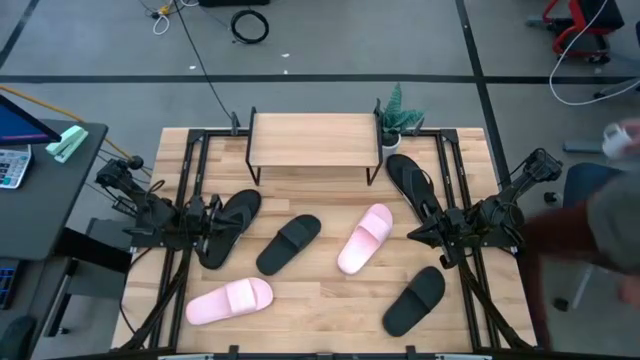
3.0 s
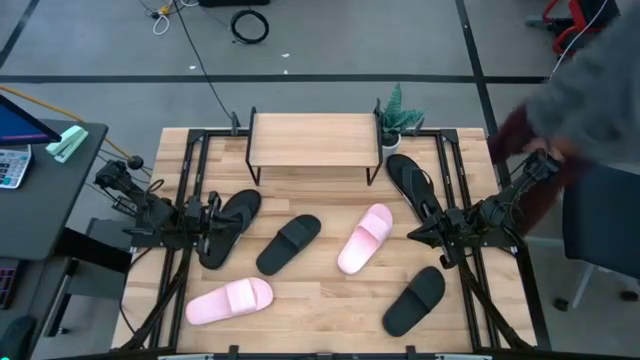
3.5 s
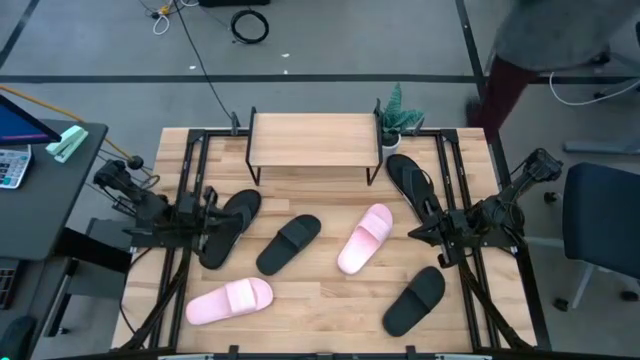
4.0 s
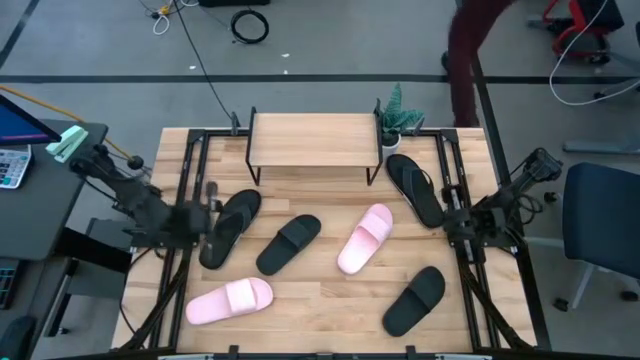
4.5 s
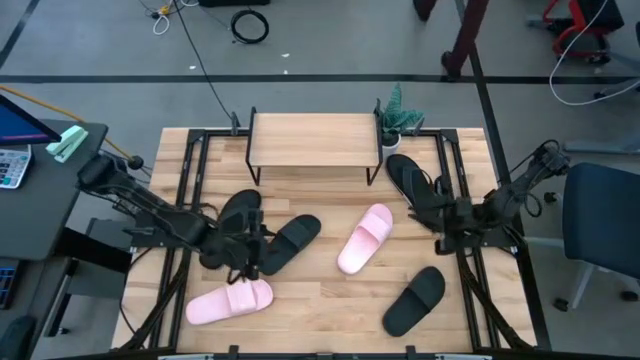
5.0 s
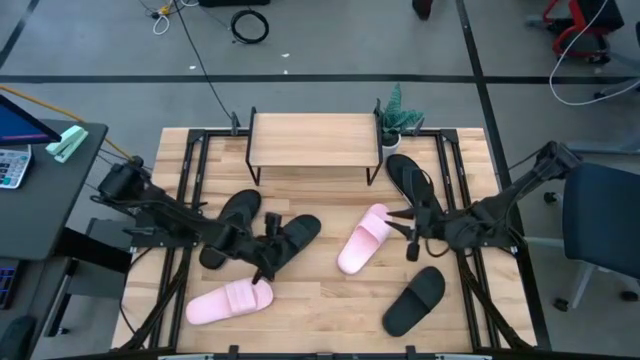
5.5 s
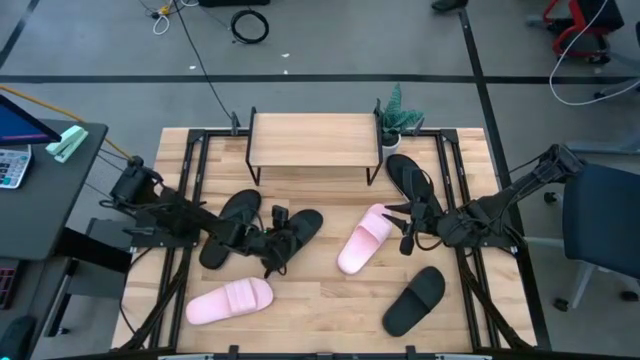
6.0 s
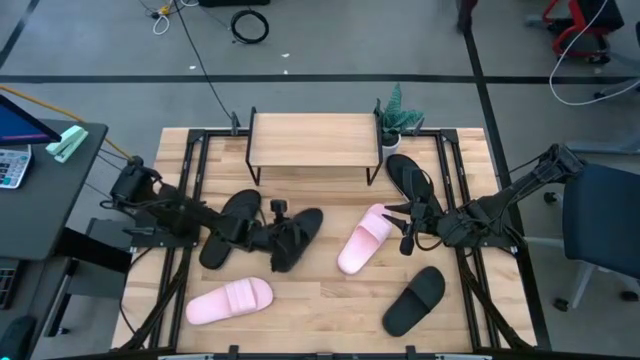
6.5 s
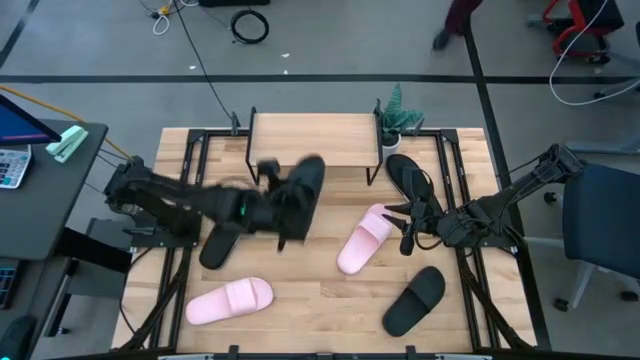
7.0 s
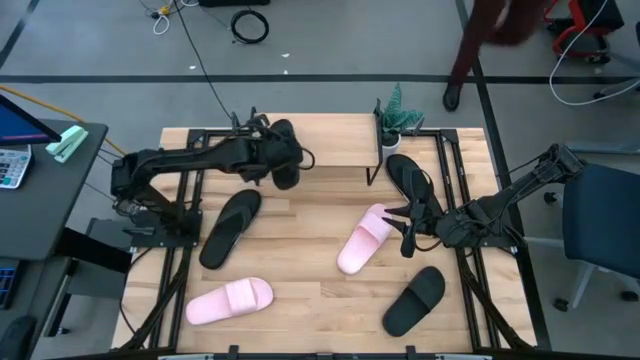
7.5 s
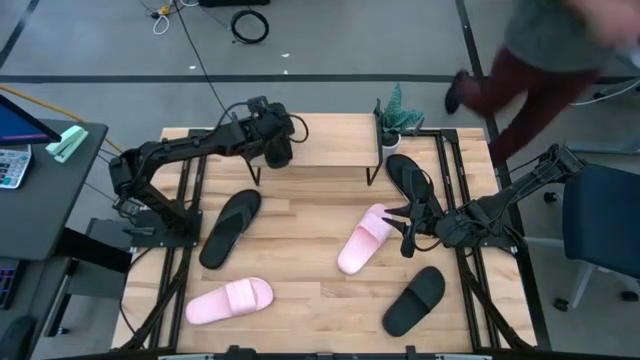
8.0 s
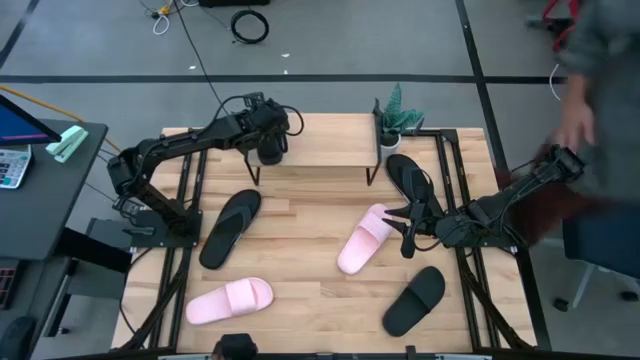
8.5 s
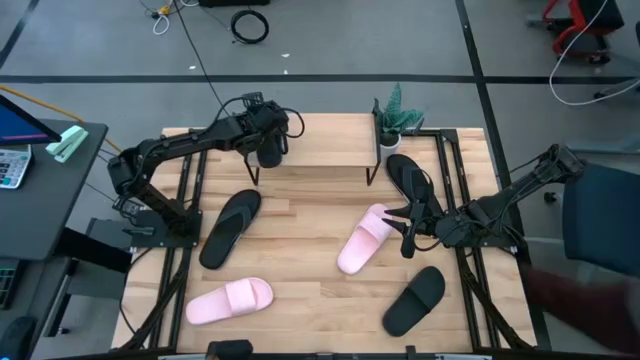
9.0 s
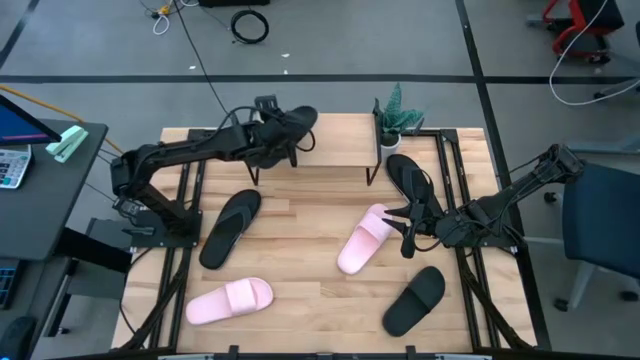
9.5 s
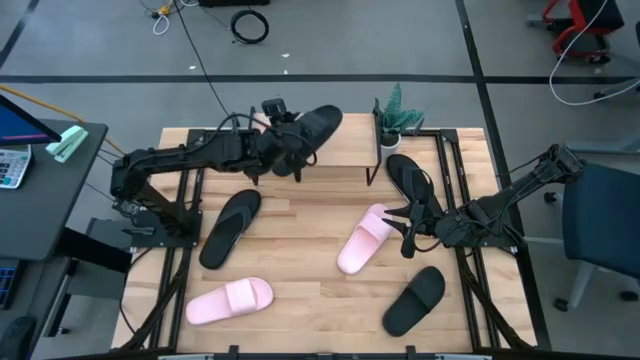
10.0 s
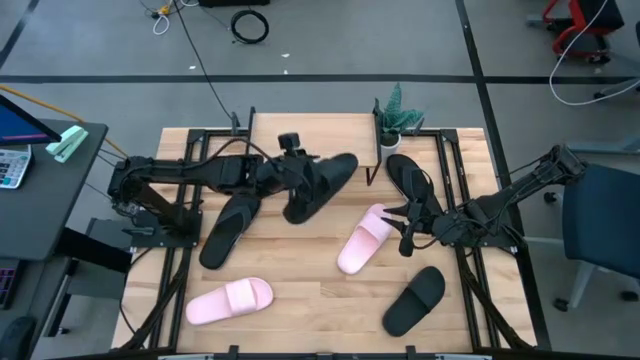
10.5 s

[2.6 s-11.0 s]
Task: Pick and place slides into the shelf
Put the center black slide on the shelf

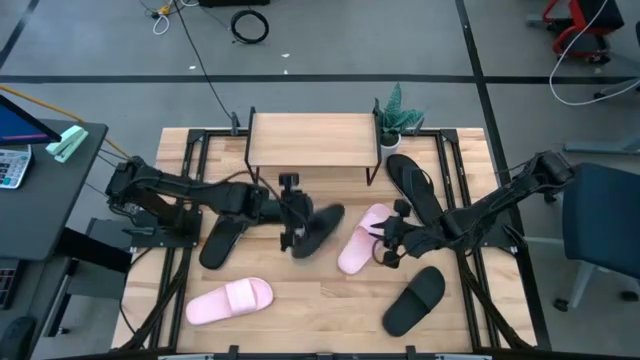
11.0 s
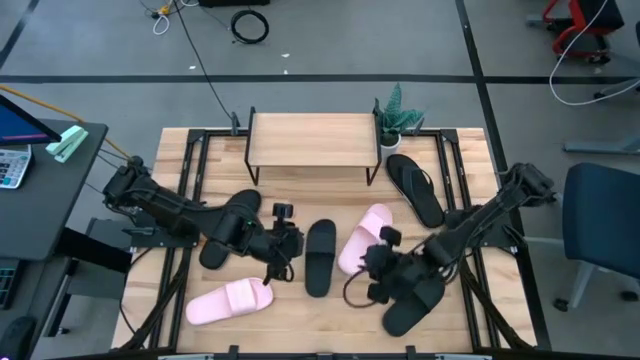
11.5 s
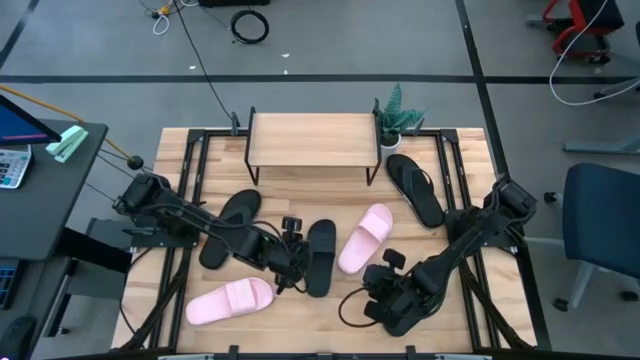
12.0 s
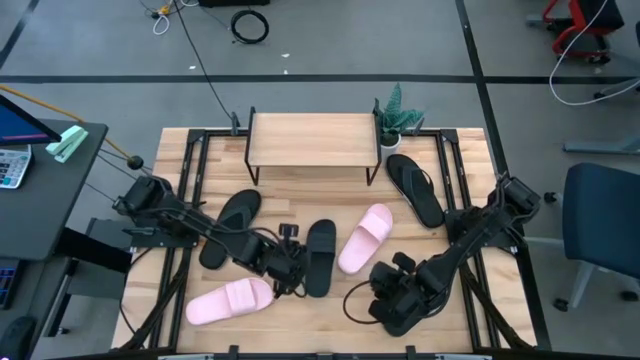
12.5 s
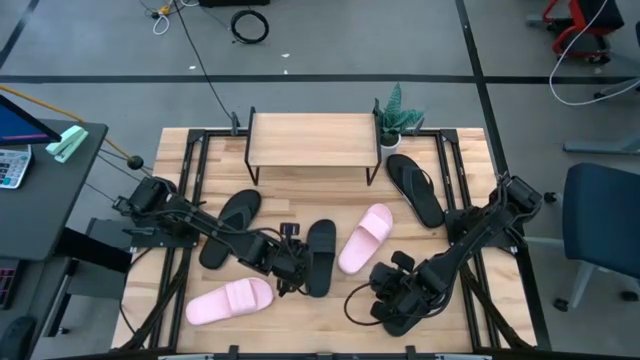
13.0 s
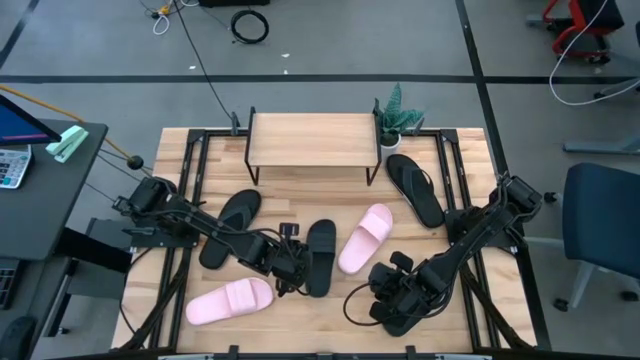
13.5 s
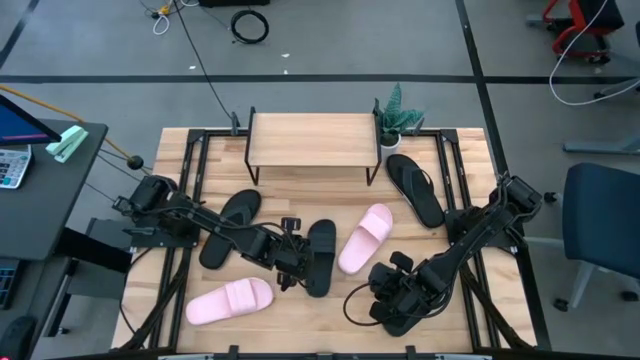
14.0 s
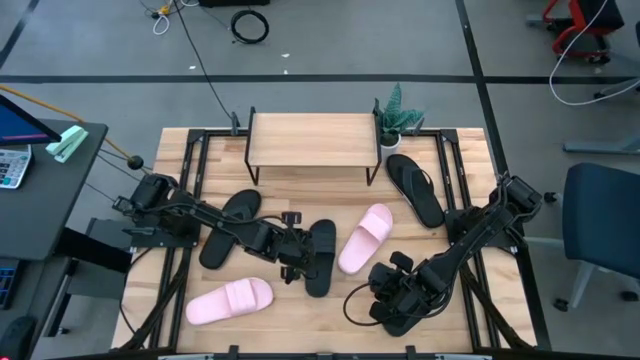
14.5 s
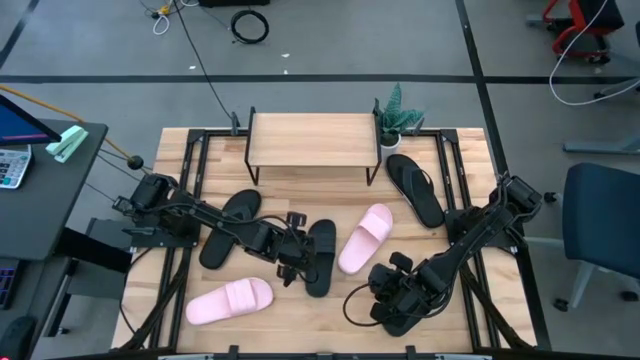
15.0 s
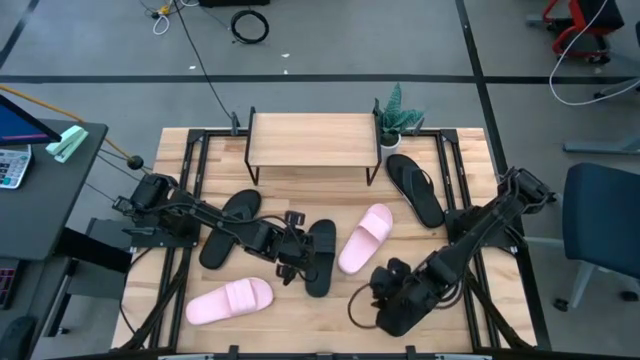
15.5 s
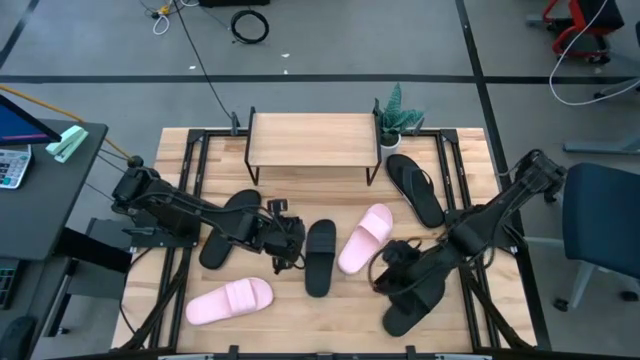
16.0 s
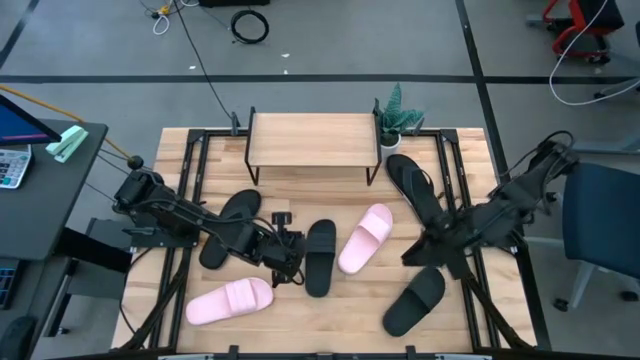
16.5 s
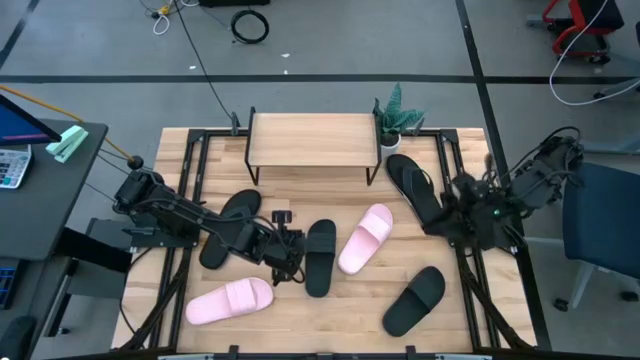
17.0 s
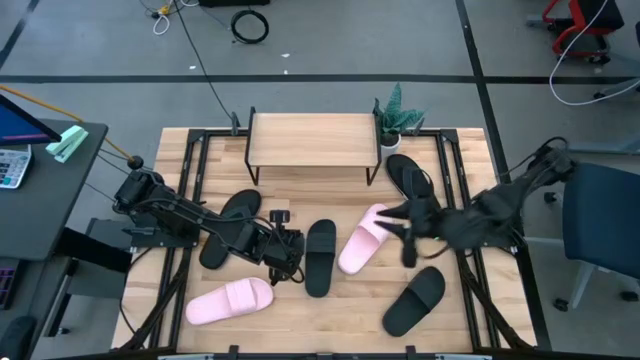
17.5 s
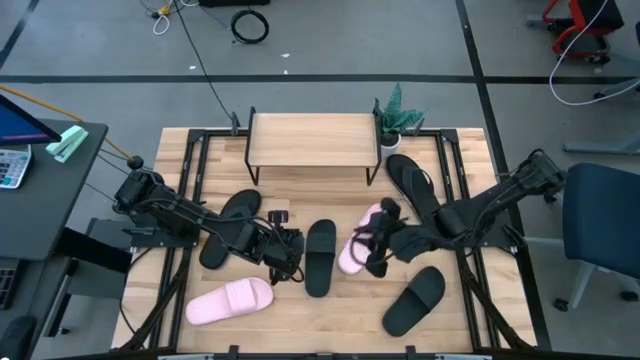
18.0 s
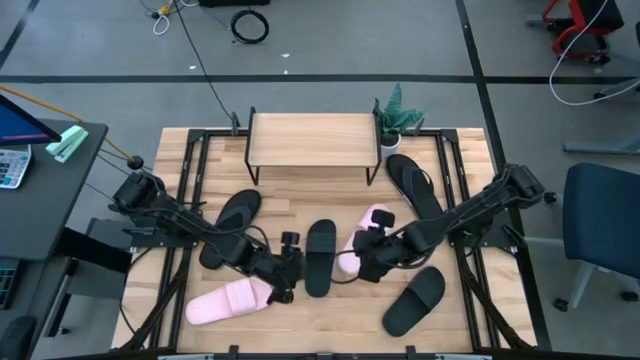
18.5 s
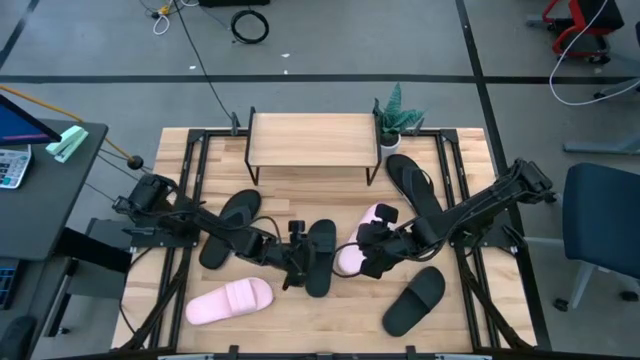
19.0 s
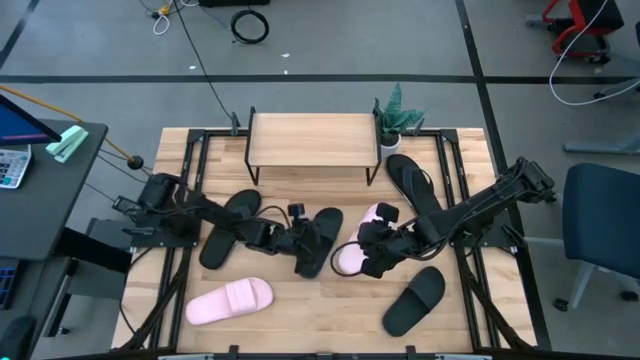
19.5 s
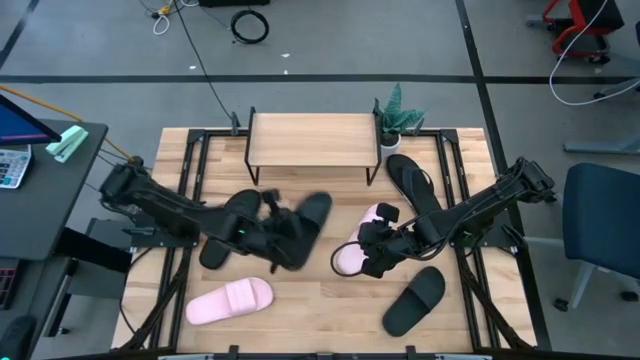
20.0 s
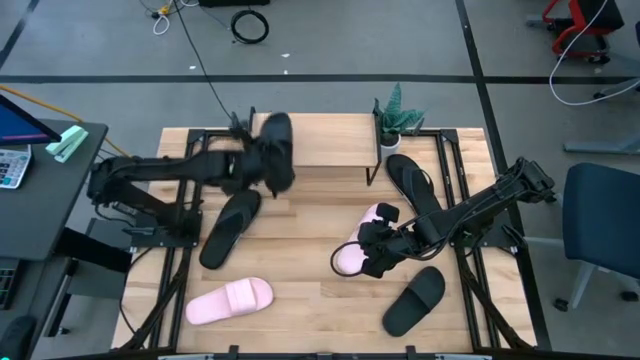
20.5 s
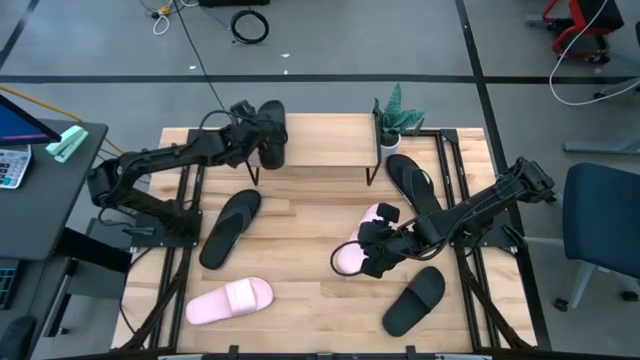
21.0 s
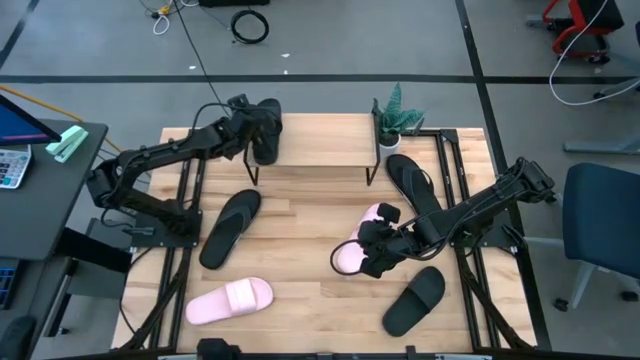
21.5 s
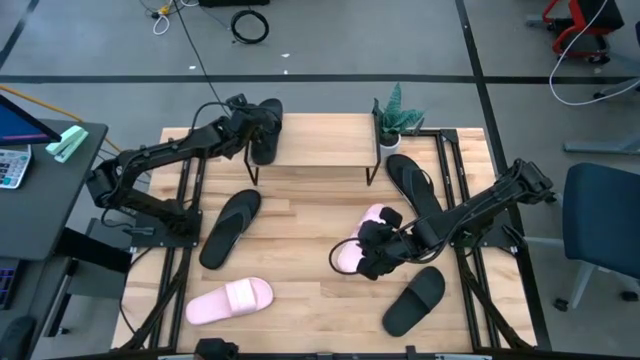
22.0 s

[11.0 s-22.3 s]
Put the center black slide on the shelf
